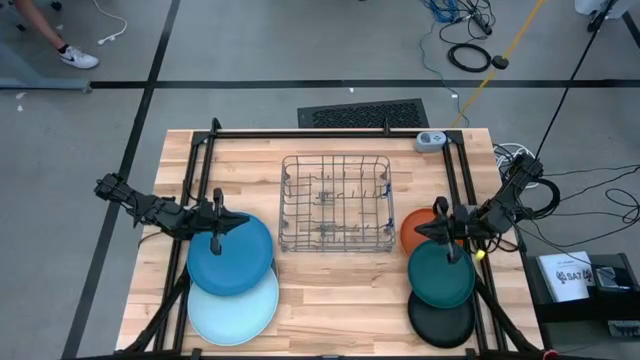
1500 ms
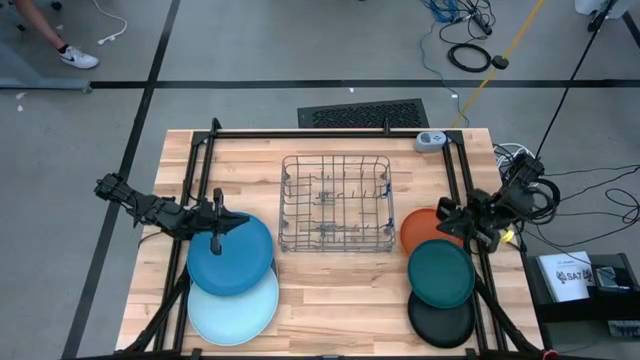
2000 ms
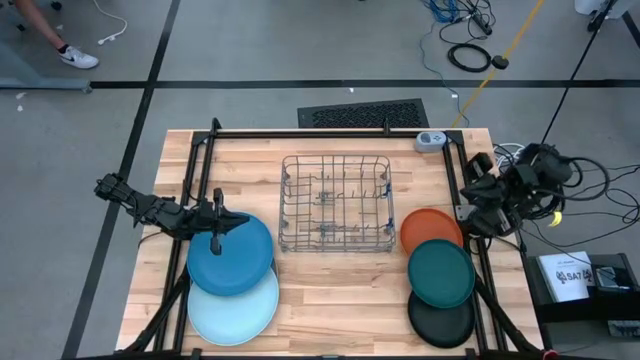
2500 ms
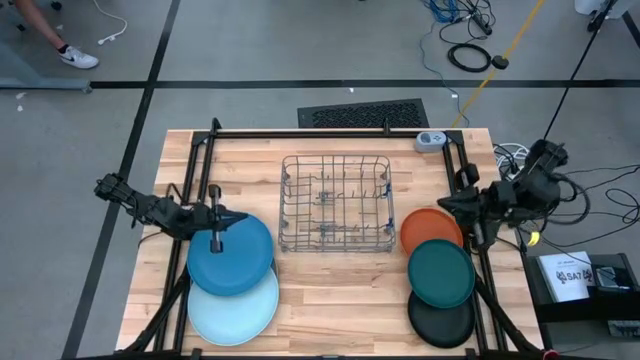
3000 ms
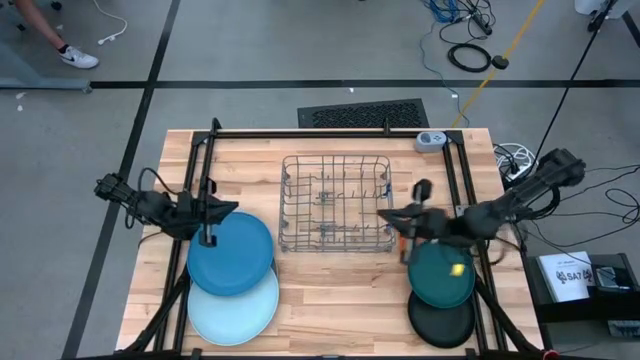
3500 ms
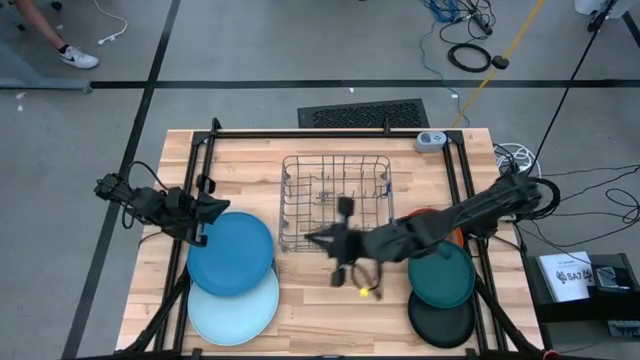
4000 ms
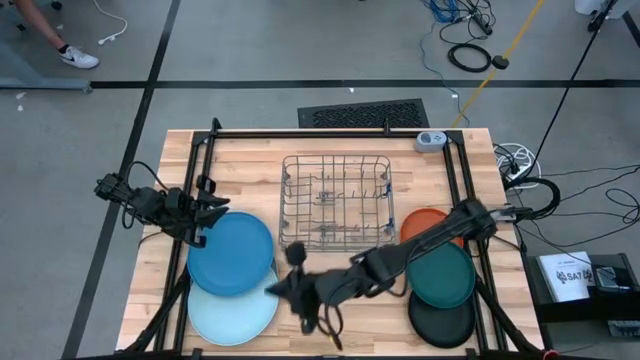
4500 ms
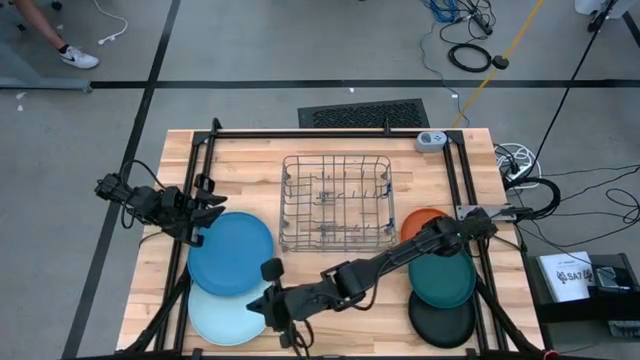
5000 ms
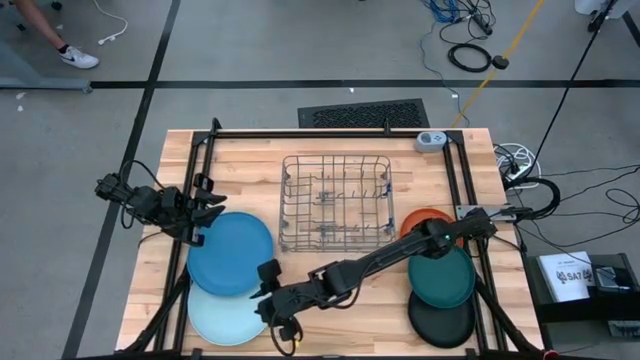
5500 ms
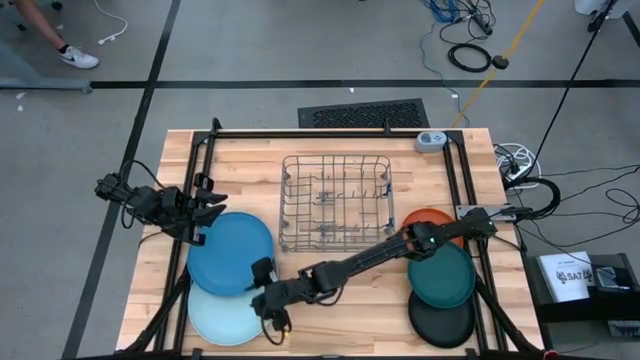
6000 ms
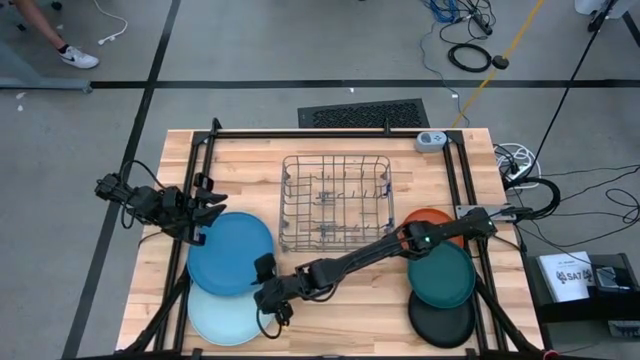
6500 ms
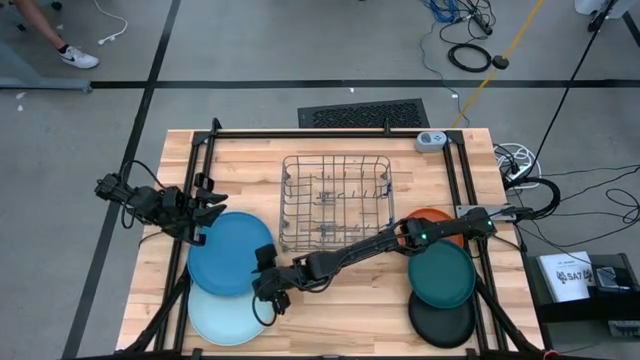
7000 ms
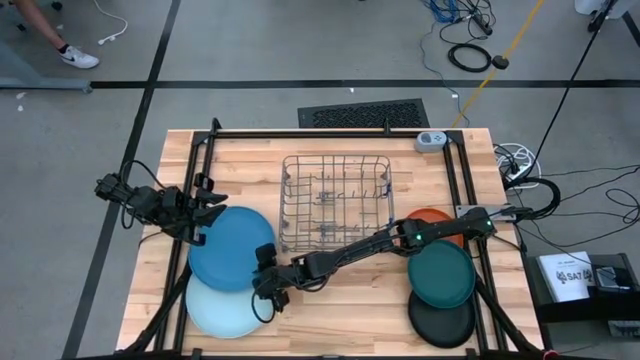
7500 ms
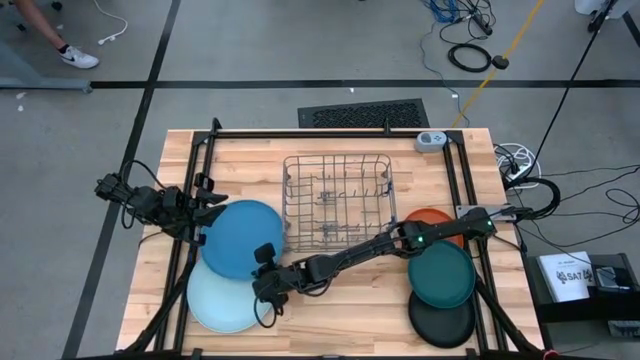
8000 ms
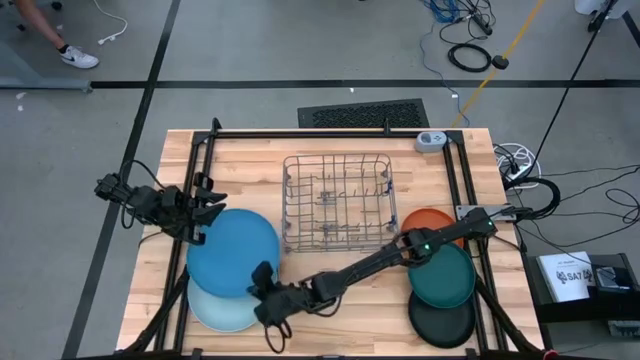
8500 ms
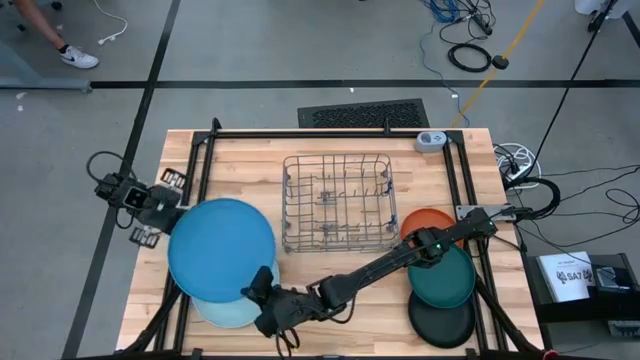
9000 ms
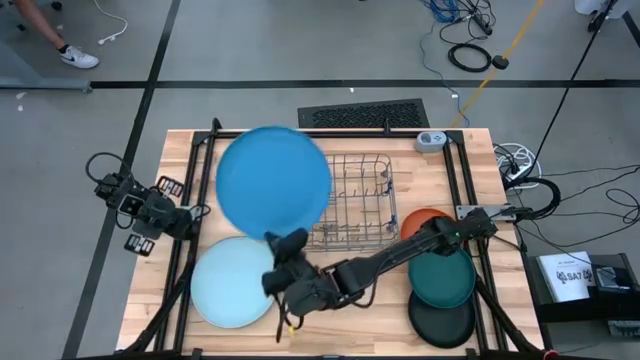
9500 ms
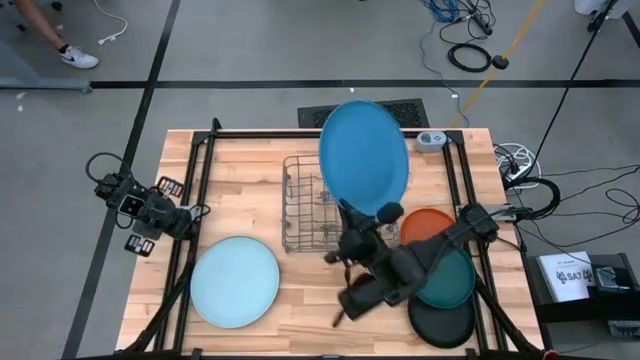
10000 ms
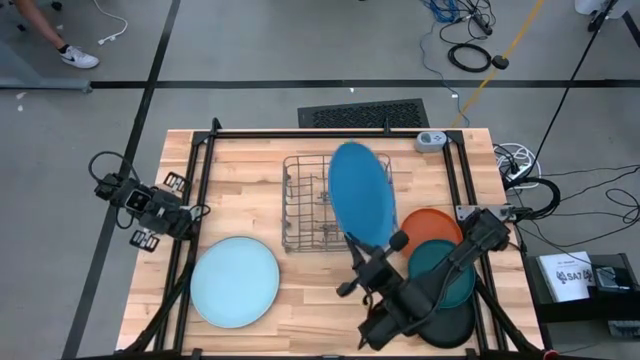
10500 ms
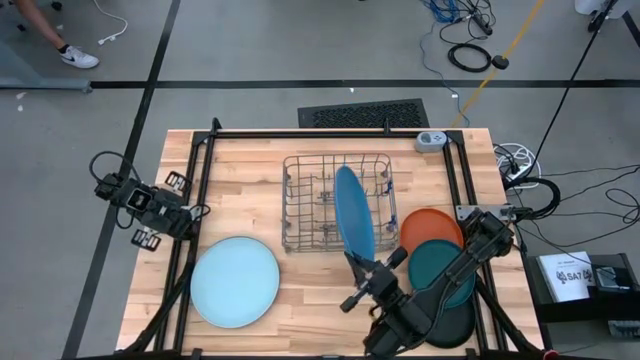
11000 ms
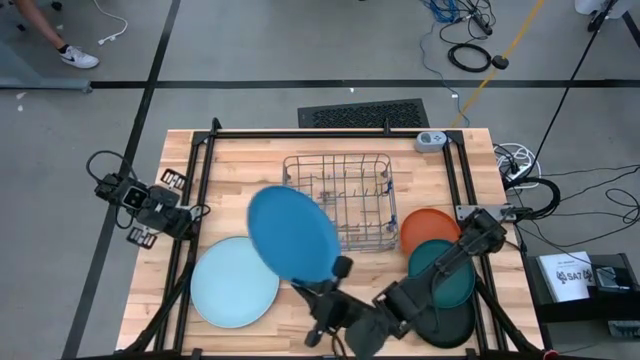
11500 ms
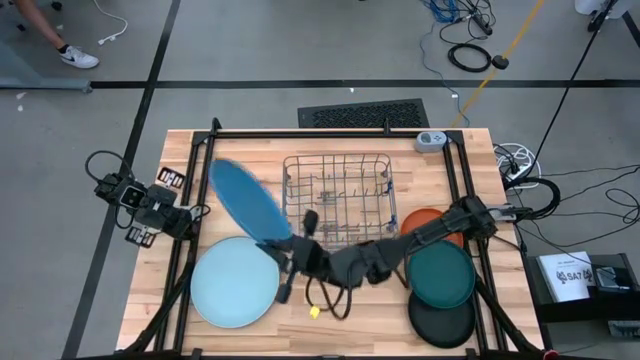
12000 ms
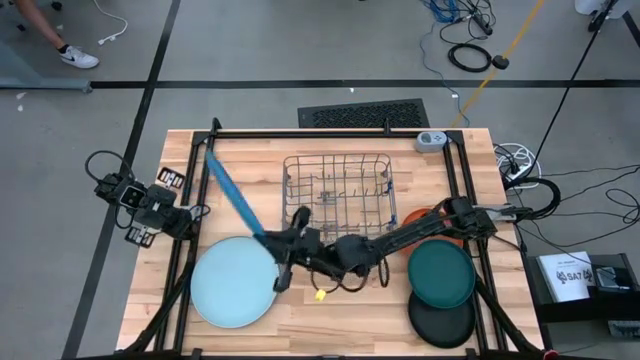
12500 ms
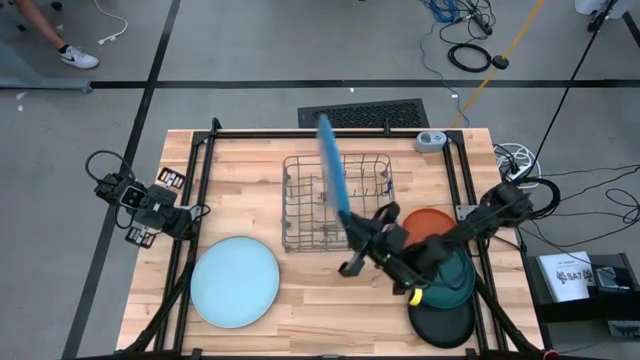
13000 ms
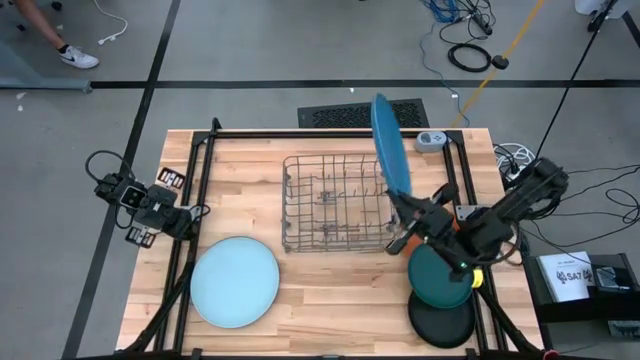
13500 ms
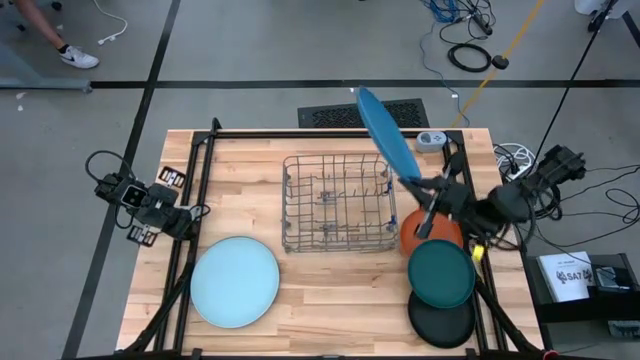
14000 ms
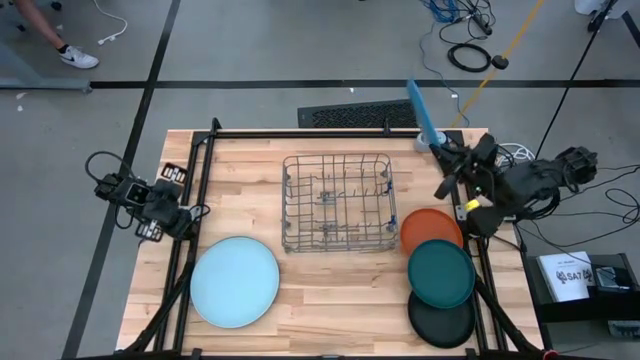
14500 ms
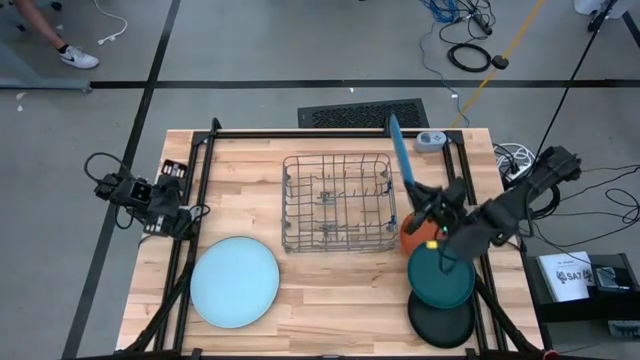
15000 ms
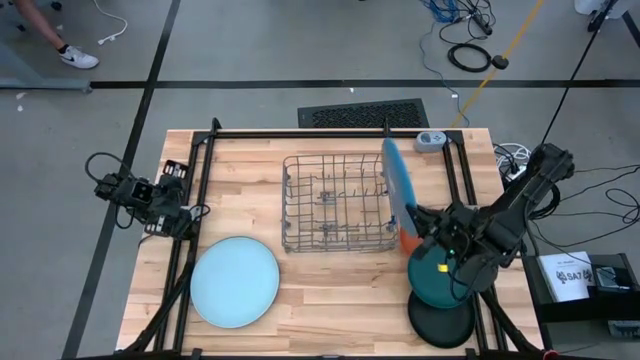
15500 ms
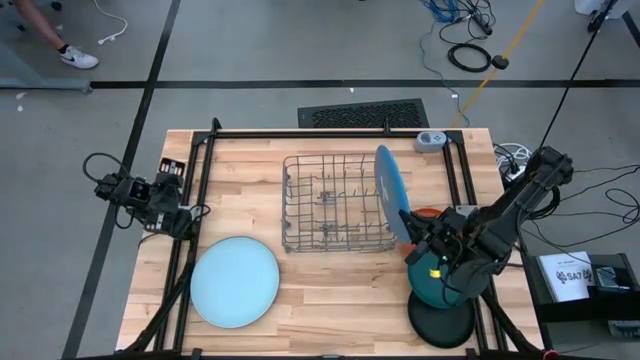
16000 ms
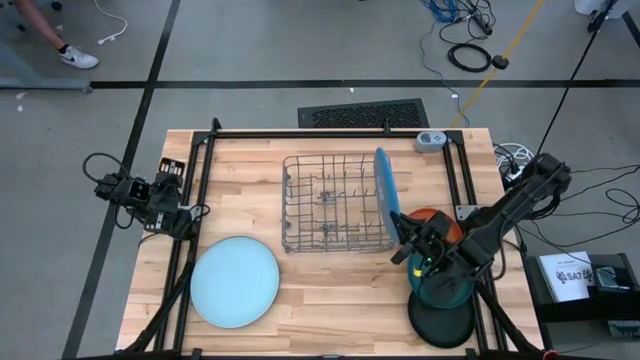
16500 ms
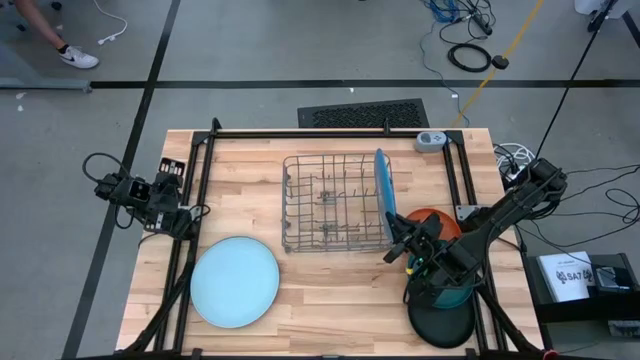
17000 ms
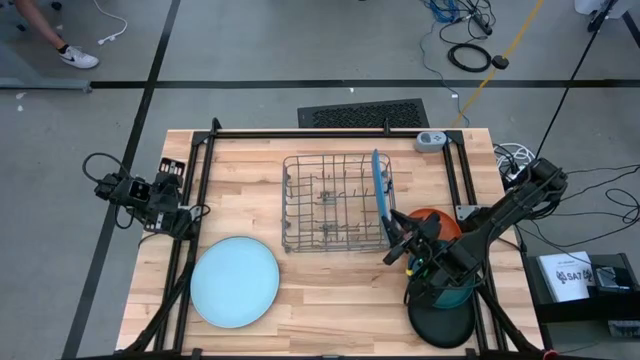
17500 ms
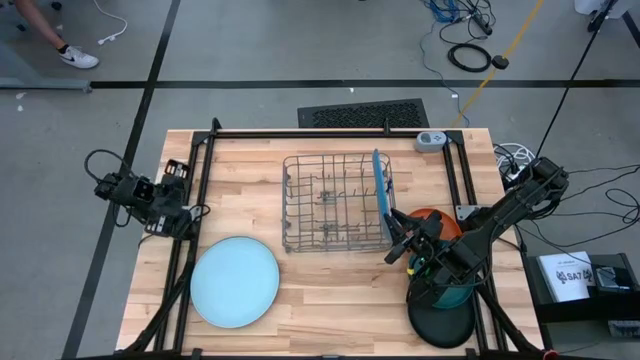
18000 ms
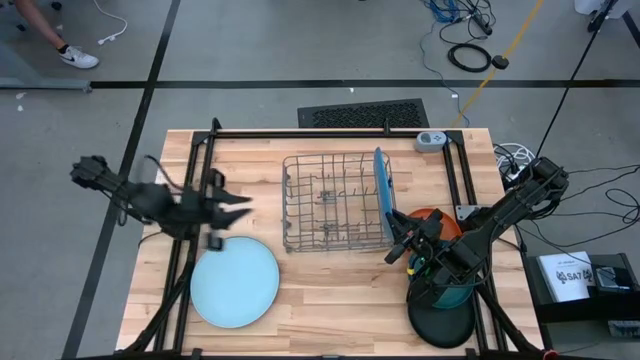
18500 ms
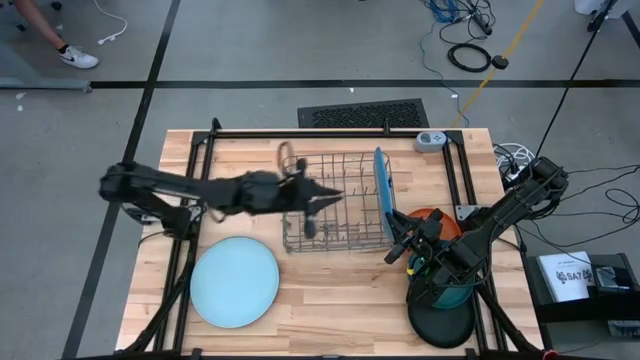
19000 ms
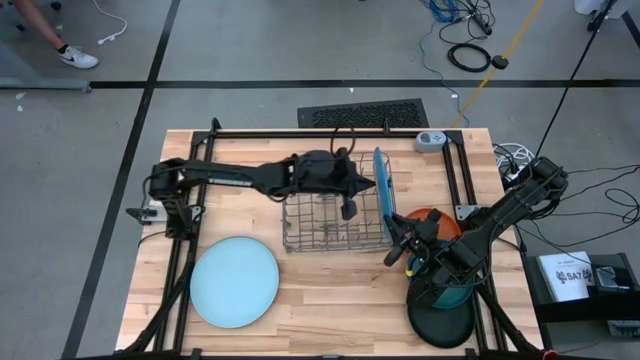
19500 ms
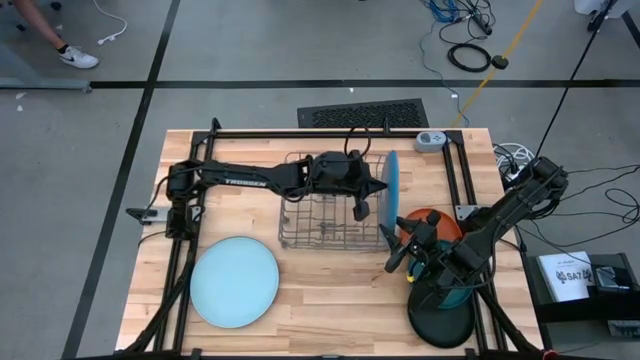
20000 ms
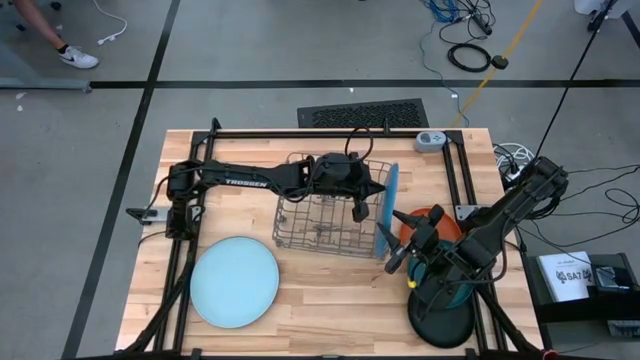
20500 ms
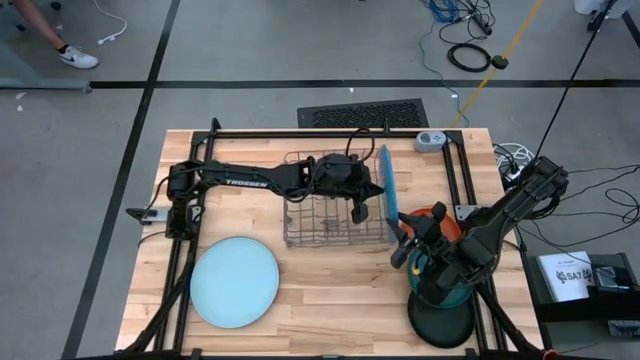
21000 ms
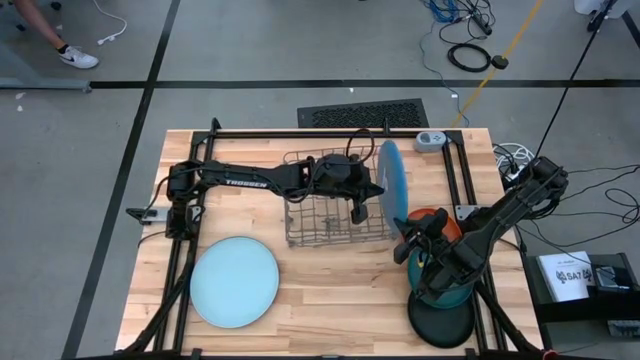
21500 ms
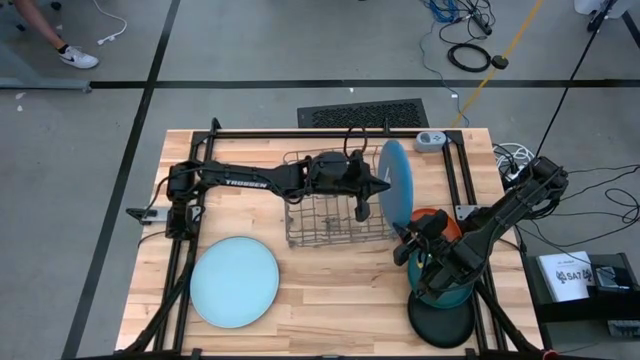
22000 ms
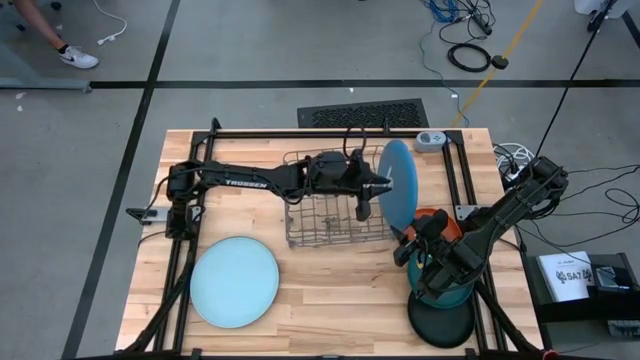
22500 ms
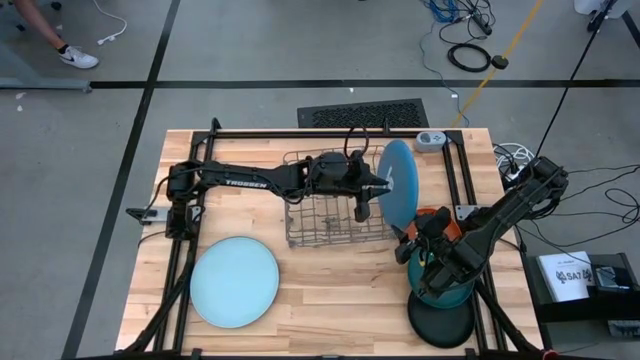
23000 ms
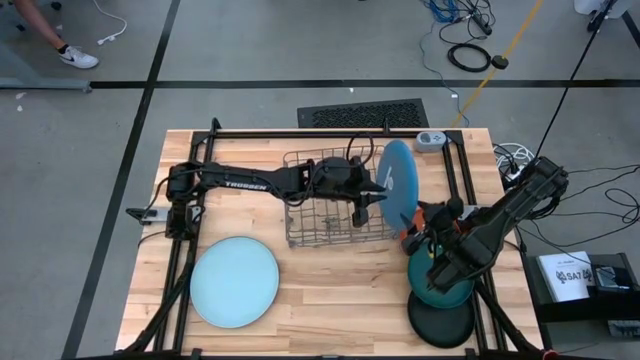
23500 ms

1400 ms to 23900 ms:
Task: Sort dishes
Put the blue plate into the dish rack
